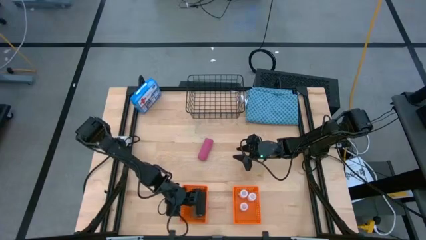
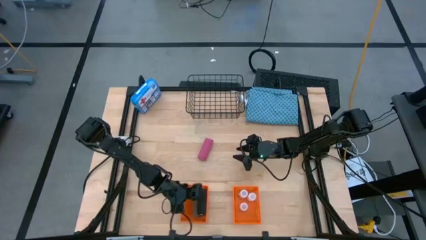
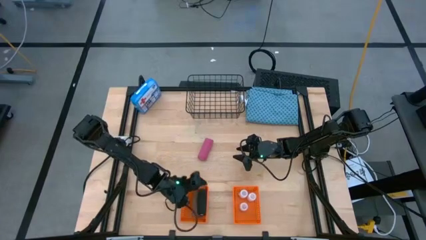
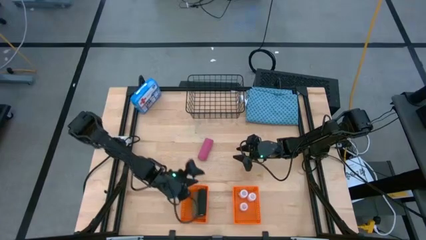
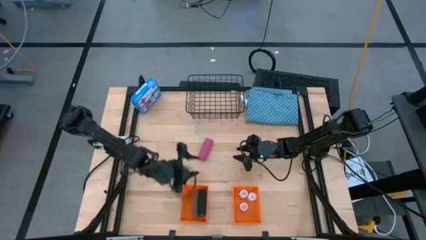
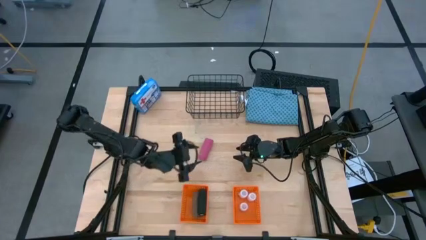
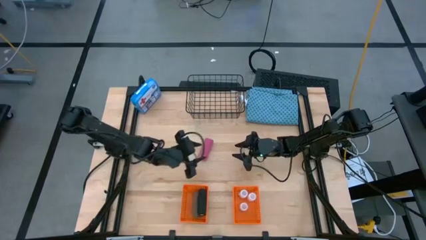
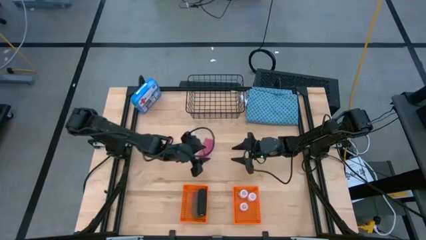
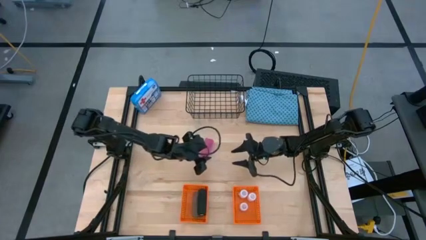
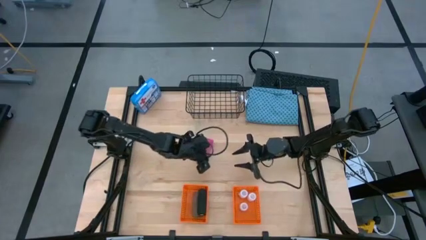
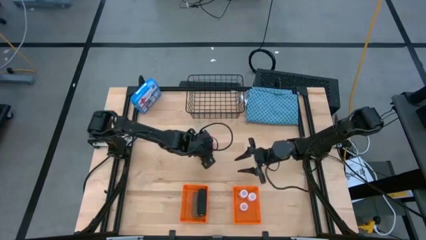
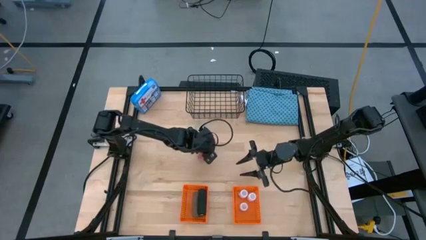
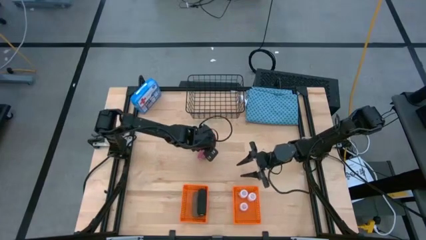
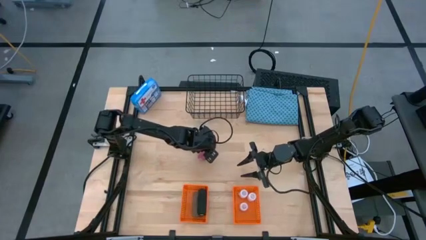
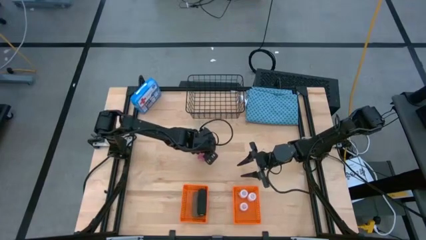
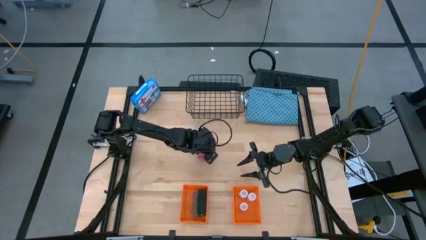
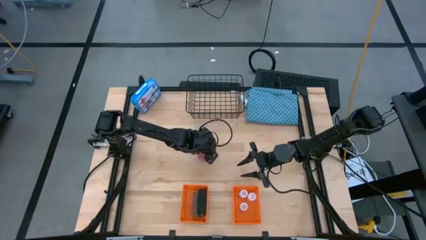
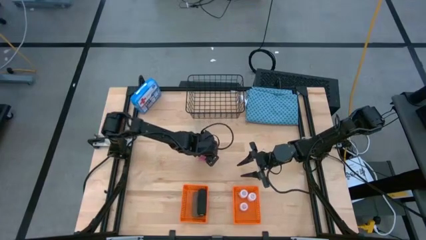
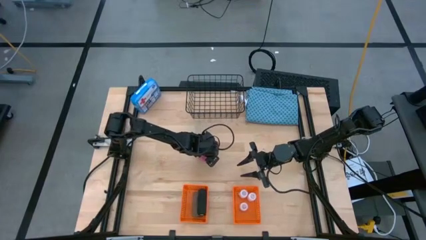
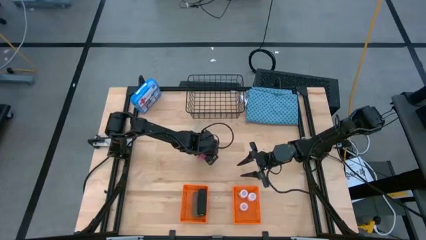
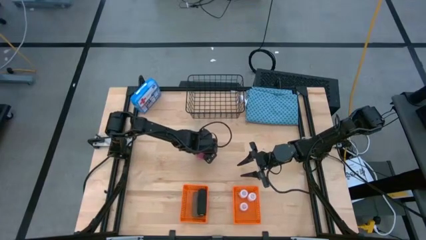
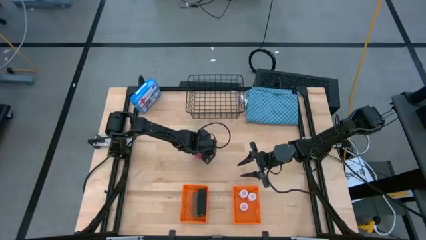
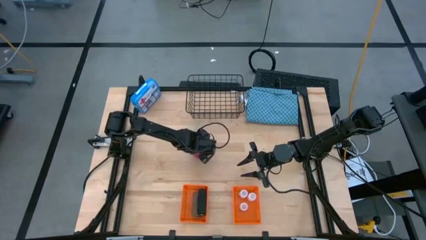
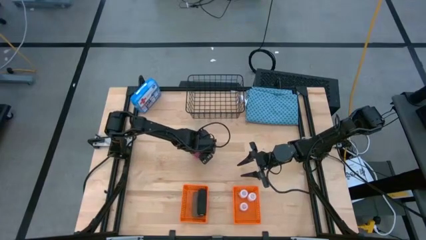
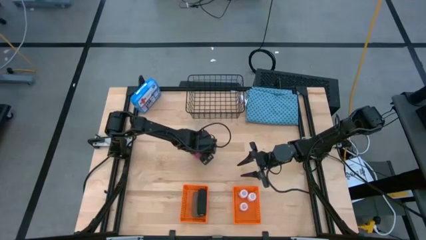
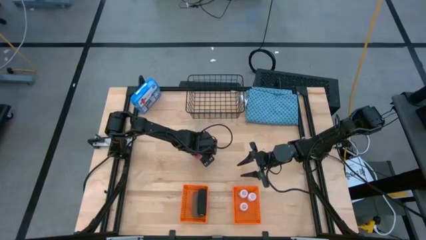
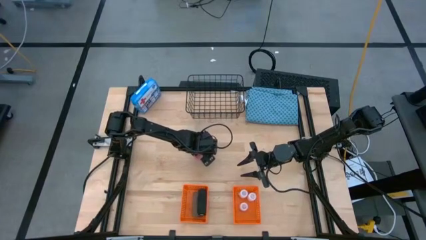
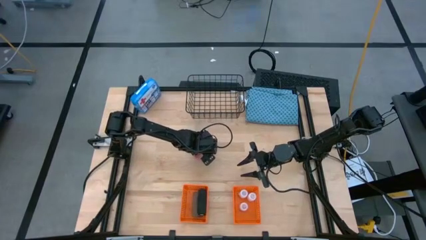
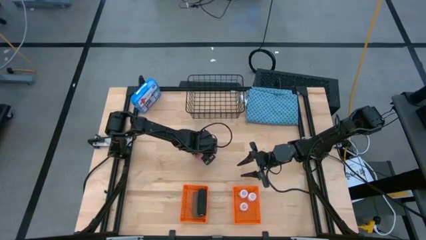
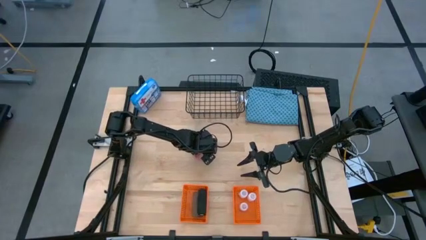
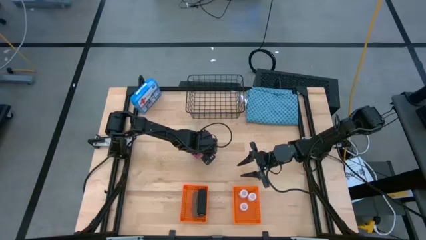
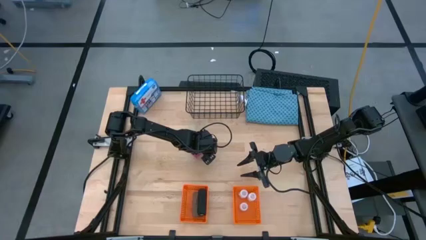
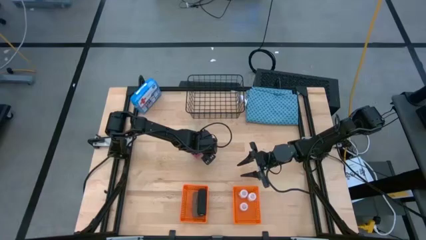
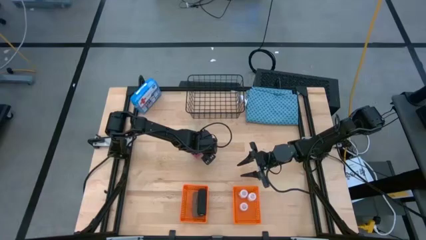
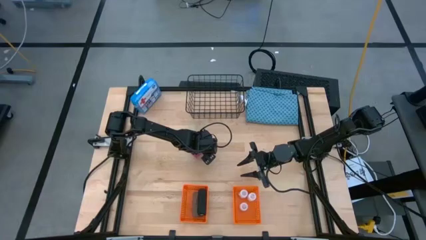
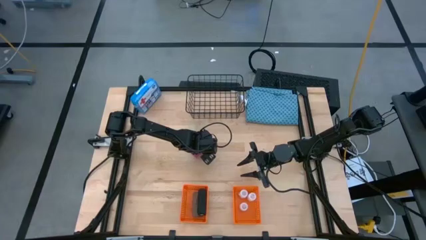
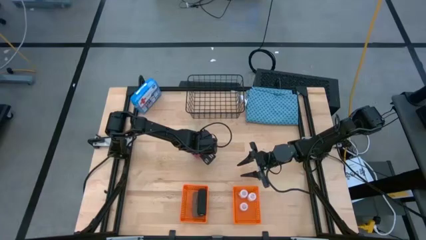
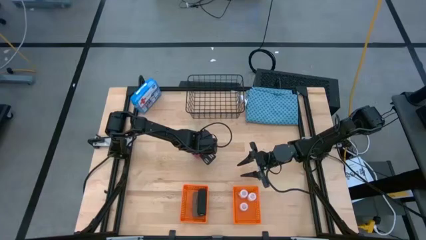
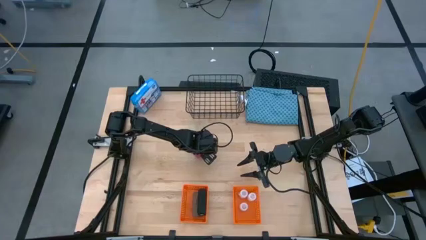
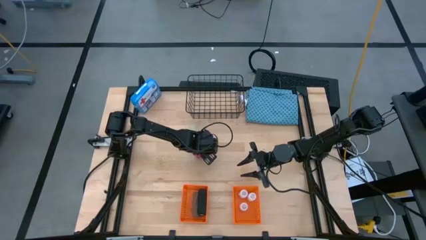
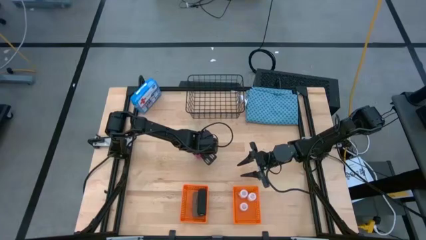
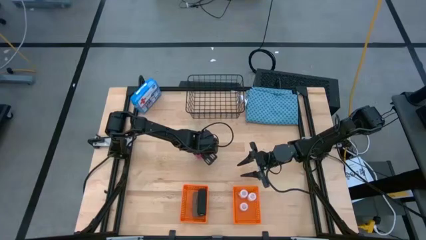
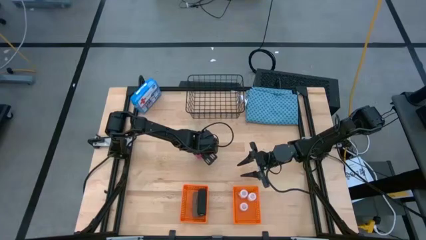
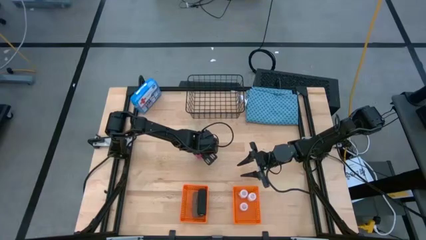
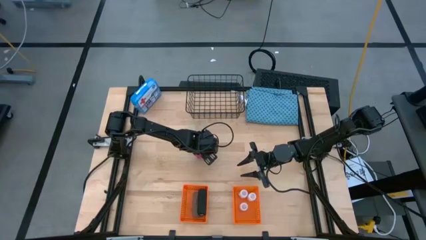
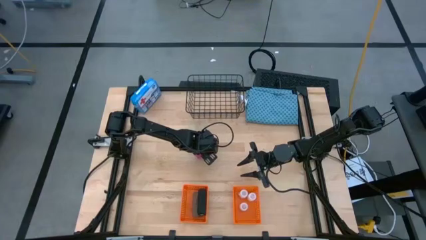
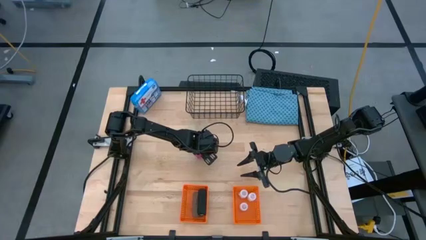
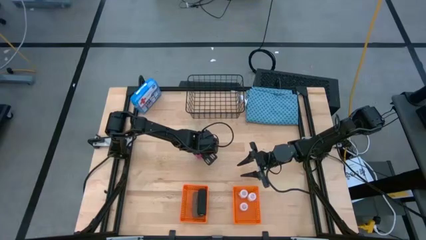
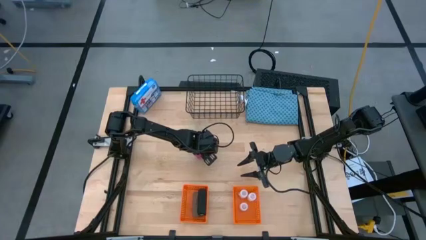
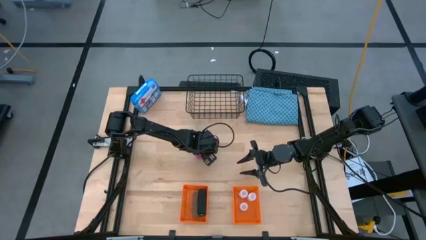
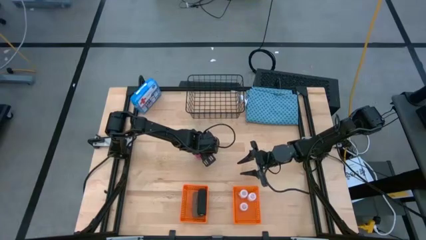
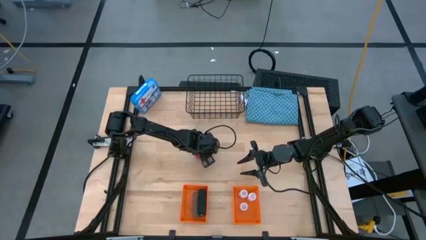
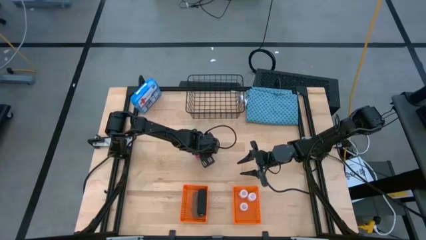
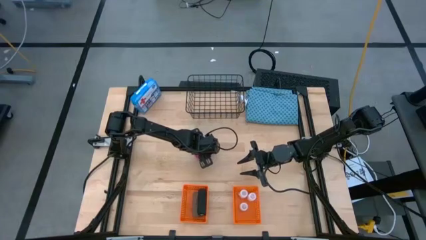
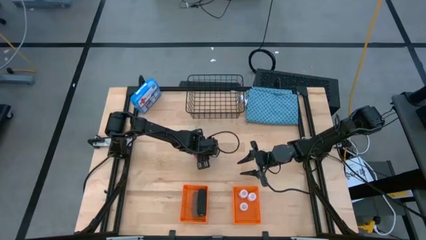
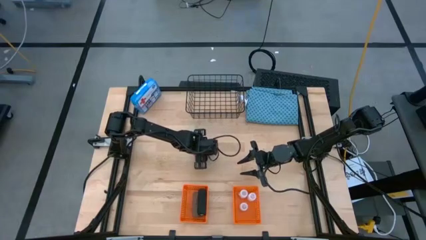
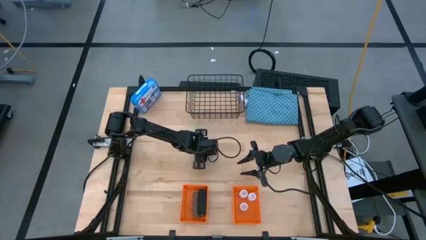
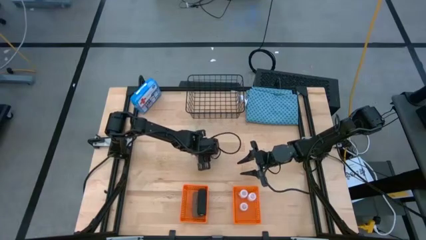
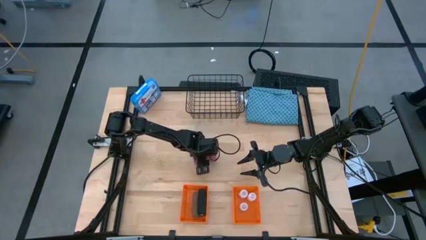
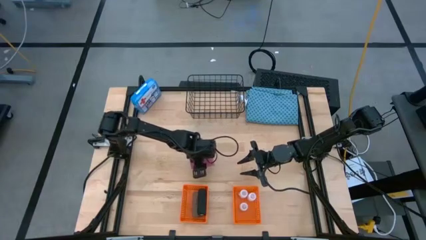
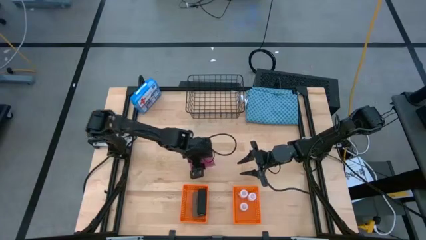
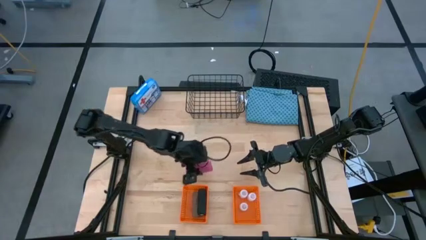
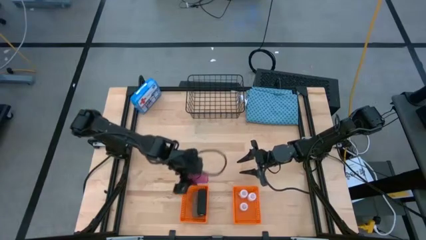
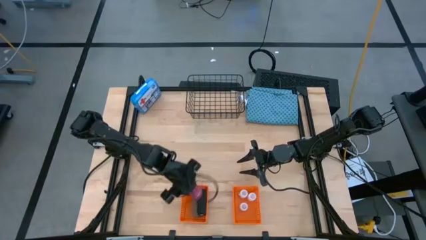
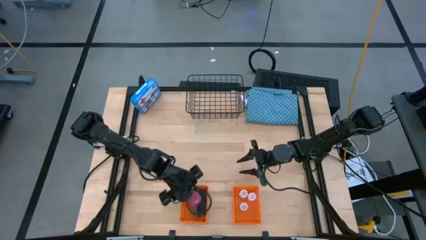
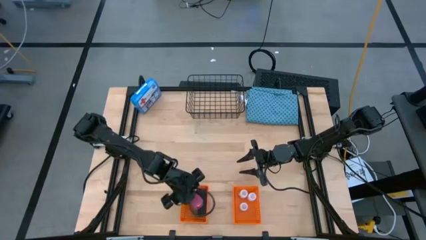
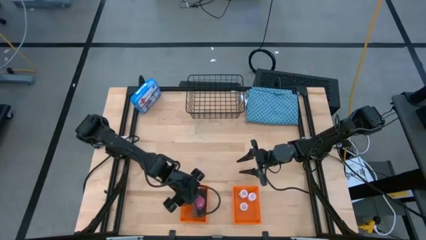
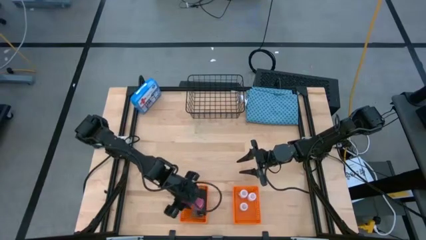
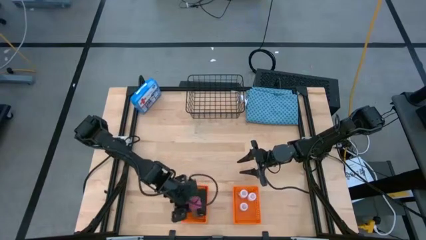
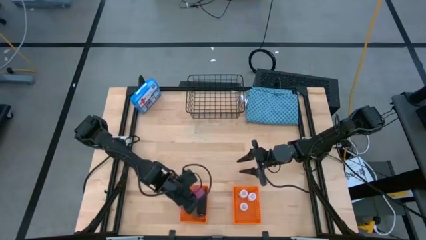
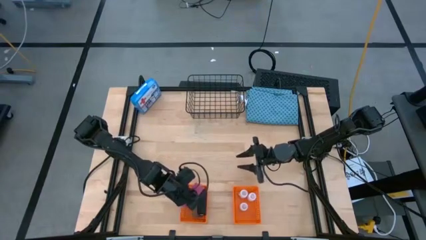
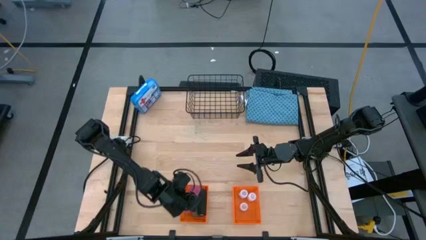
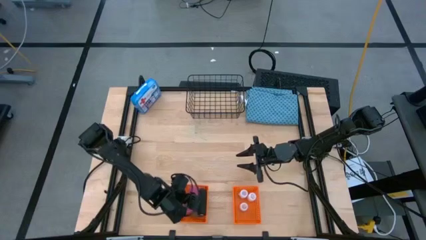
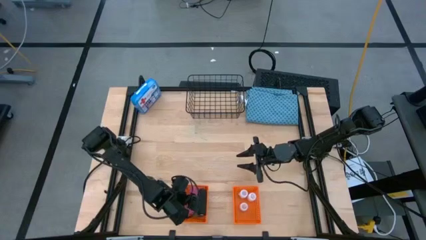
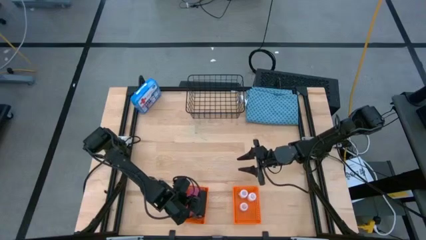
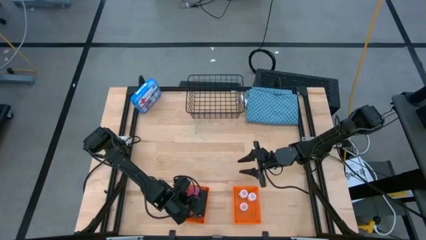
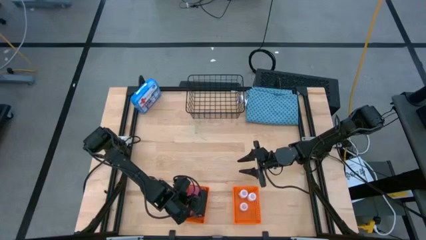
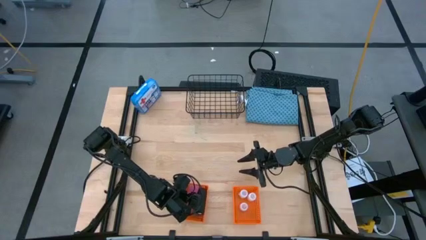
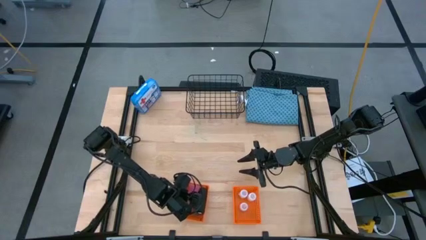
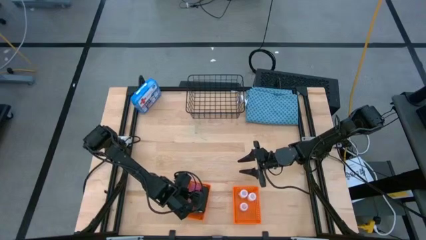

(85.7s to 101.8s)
Task: Pick & Place Medicine items
Put the pink bandage into the left orange basket
